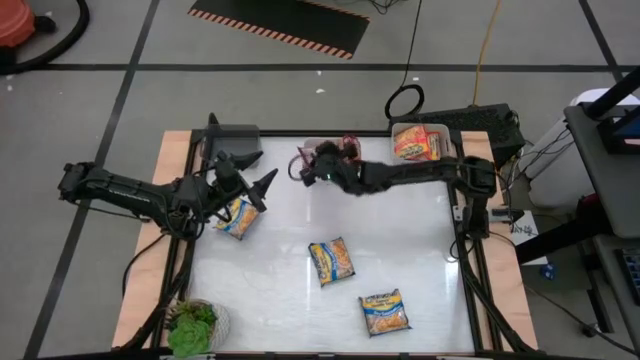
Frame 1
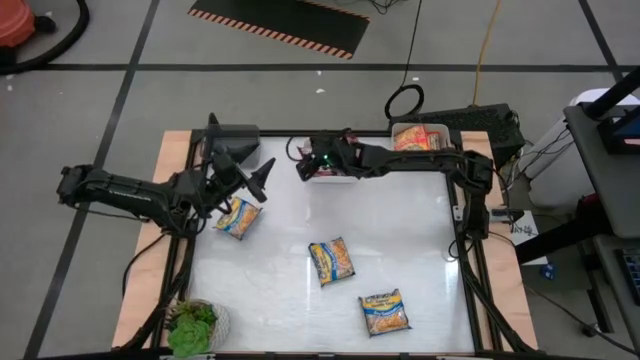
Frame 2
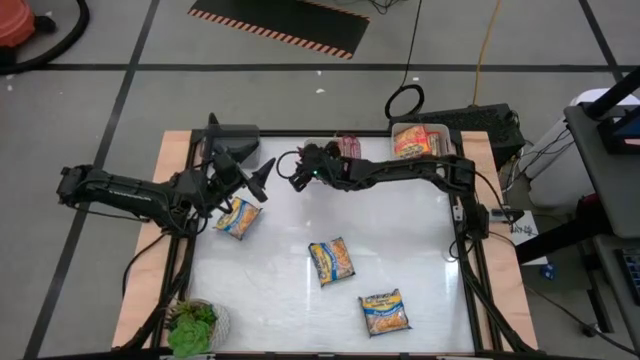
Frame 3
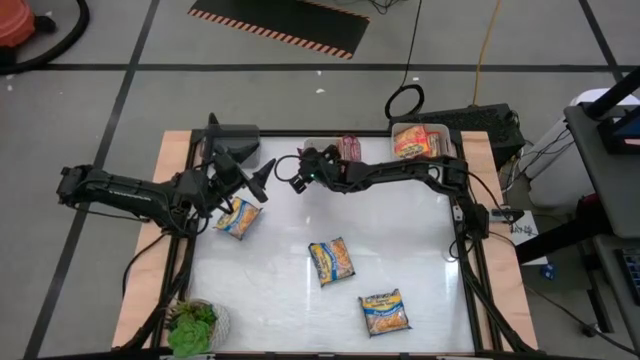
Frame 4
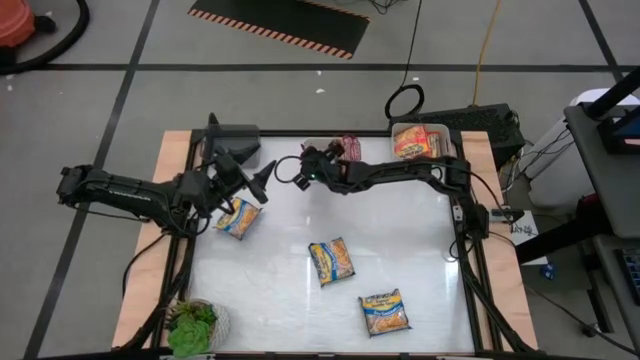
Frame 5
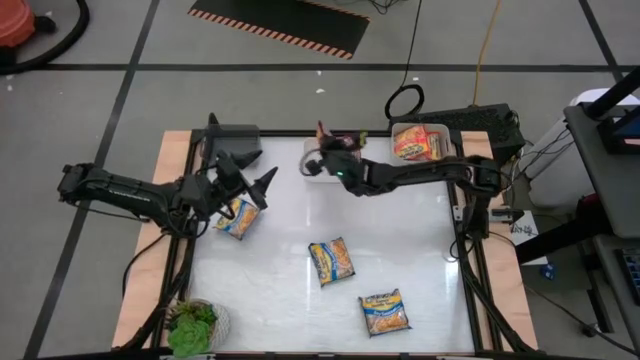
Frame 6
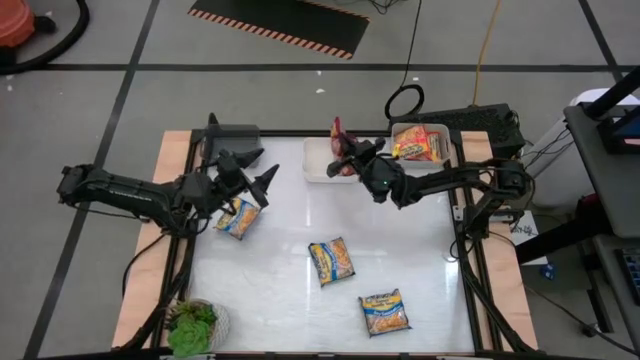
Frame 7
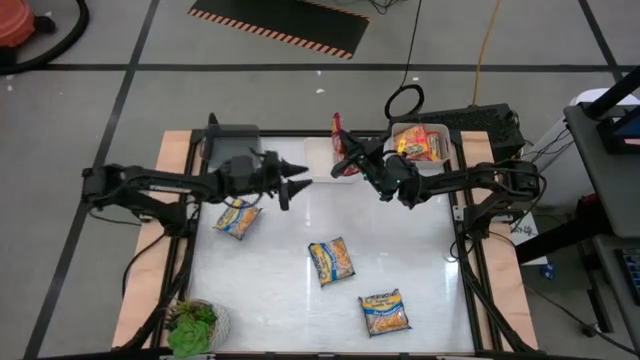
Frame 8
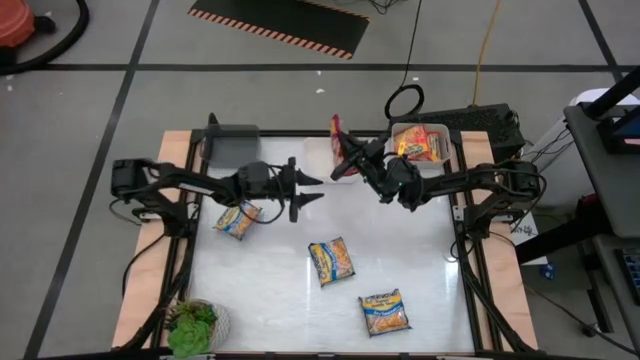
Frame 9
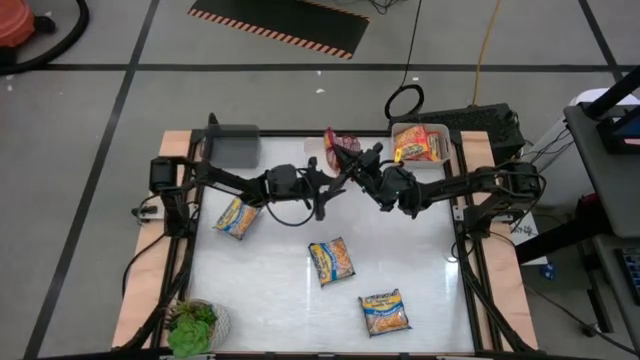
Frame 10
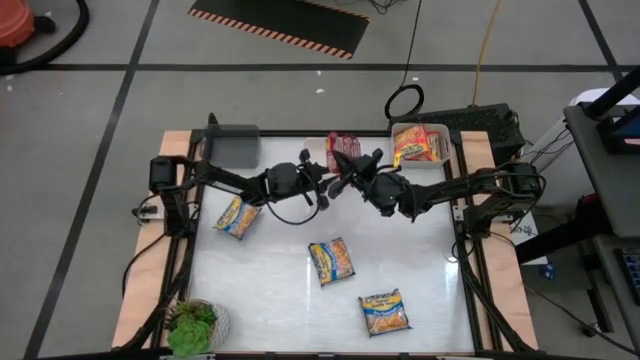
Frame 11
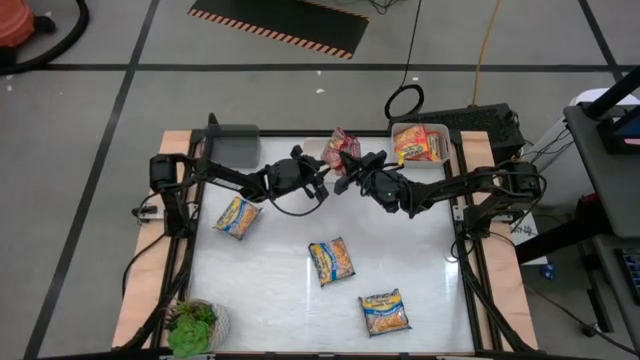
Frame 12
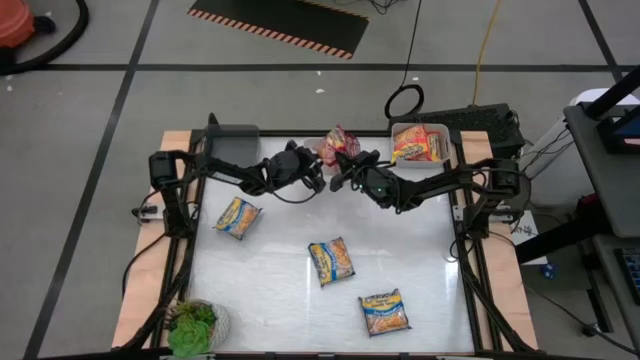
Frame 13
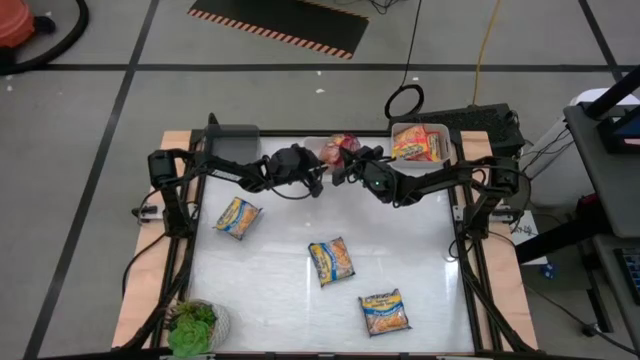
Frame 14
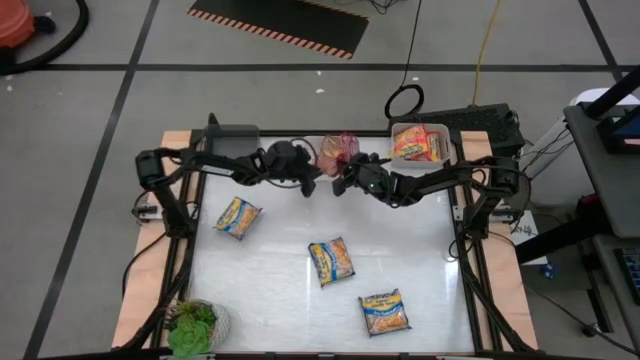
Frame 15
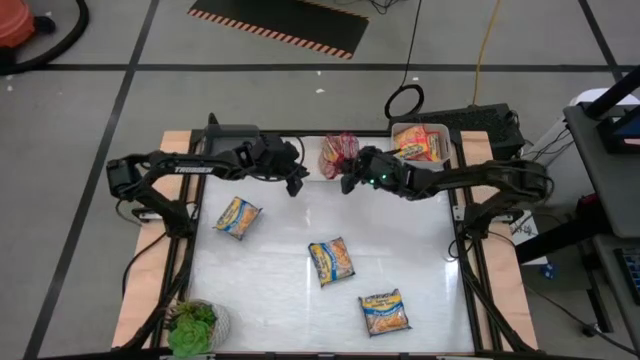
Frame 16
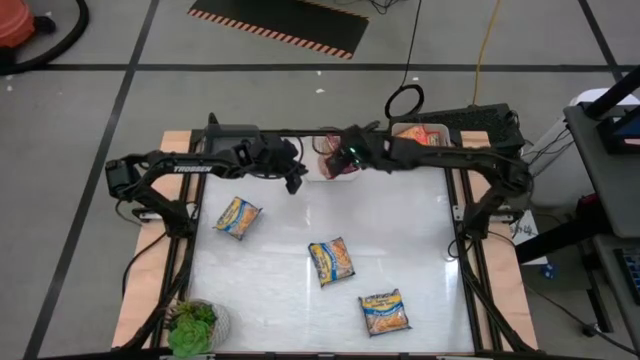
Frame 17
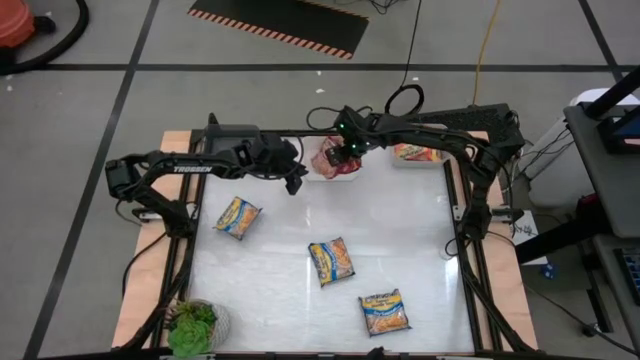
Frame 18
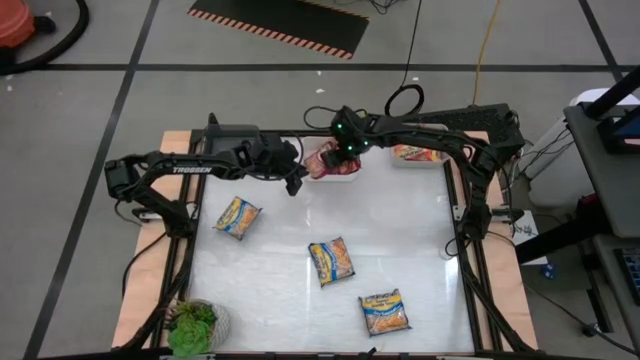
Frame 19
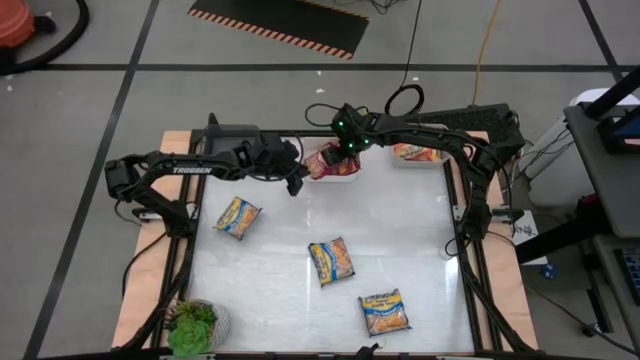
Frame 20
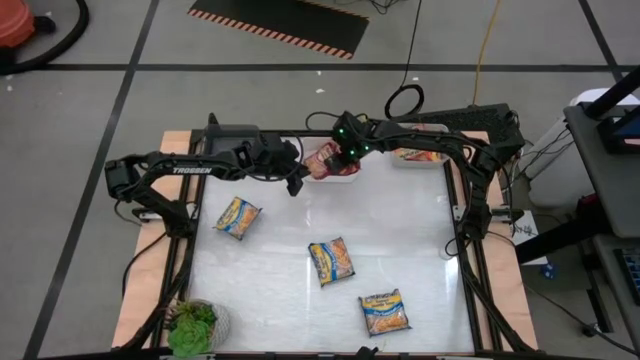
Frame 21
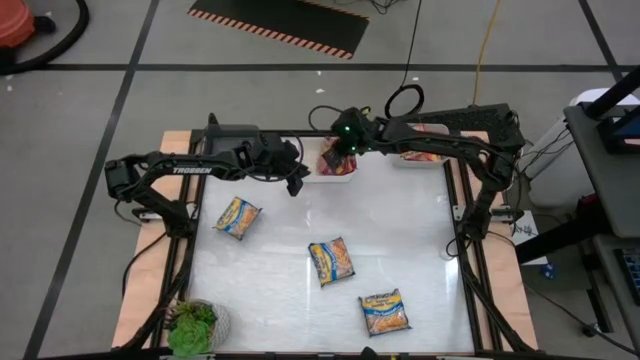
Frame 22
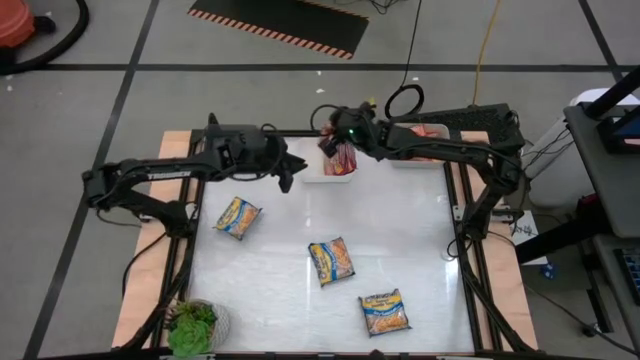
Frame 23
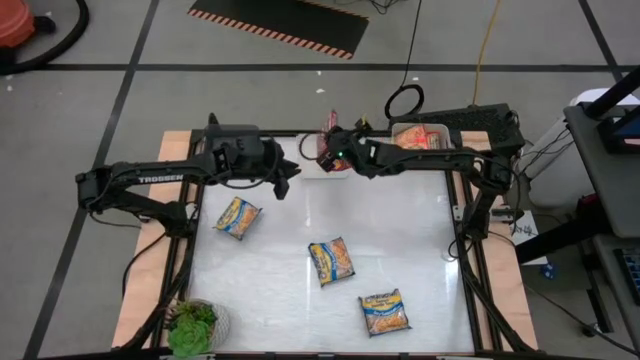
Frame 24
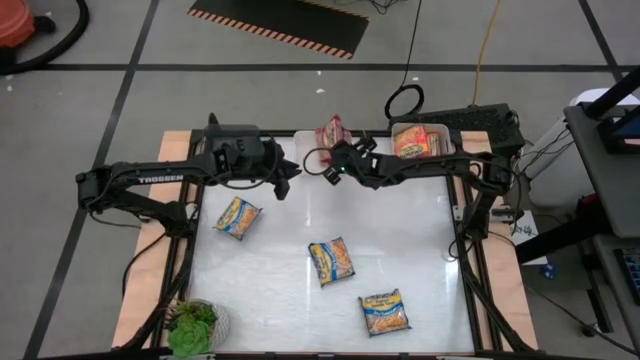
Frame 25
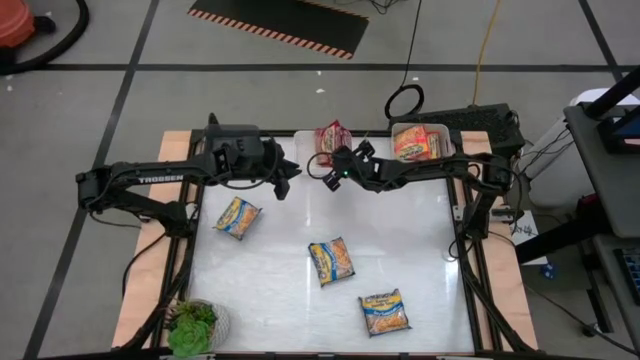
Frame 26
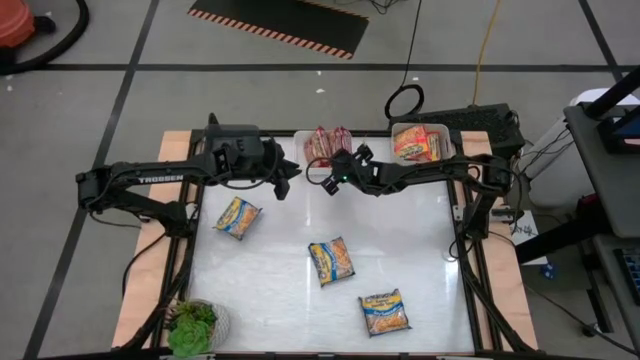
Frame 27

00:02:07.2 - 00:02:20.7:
Task: Sort Maruchan noodles
Put the red noodle pack into the white bin
